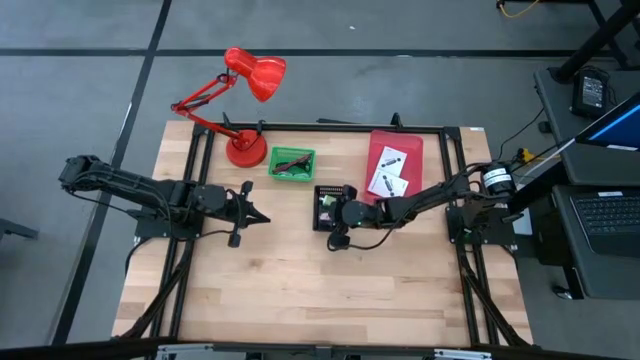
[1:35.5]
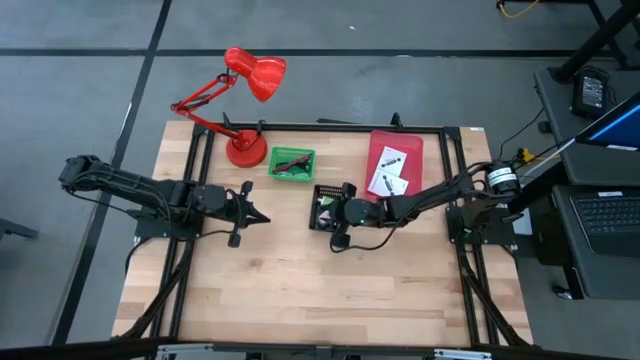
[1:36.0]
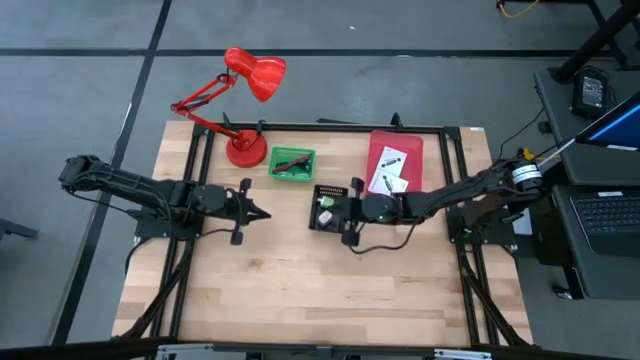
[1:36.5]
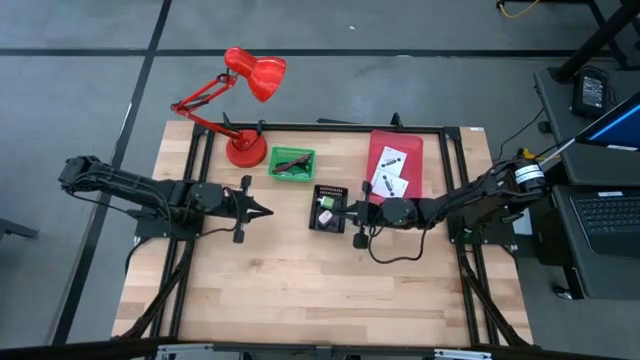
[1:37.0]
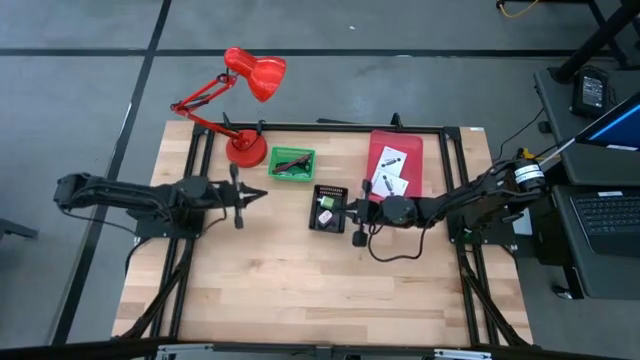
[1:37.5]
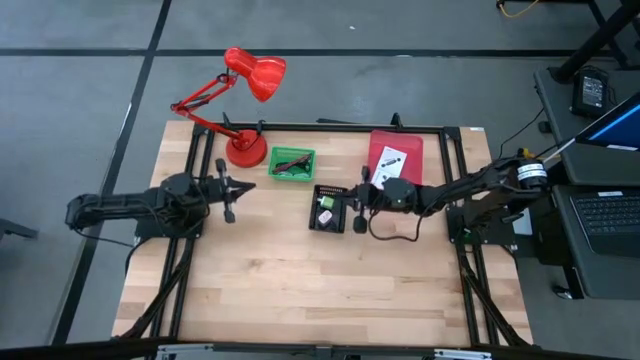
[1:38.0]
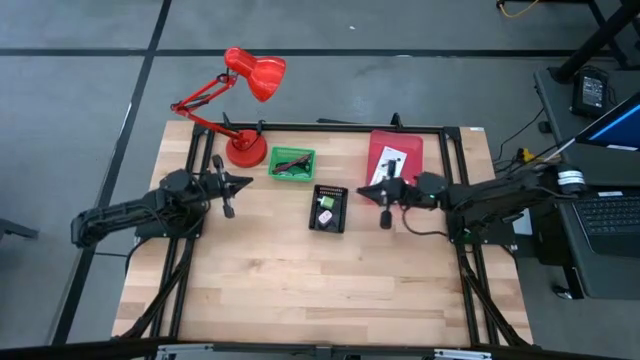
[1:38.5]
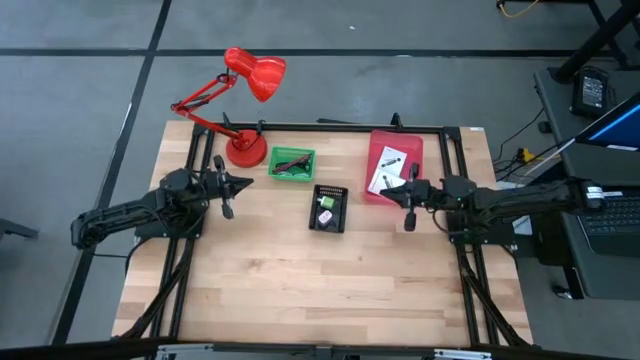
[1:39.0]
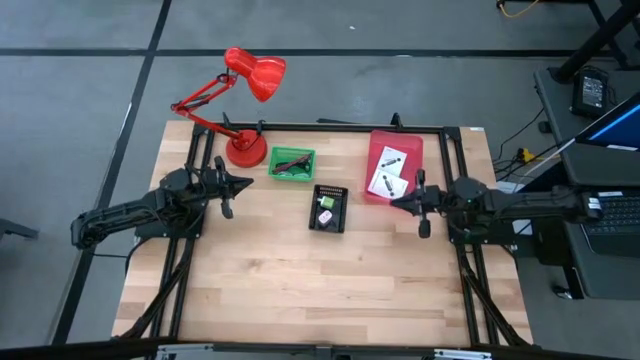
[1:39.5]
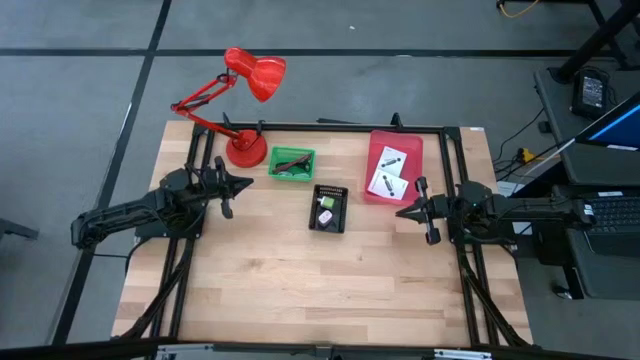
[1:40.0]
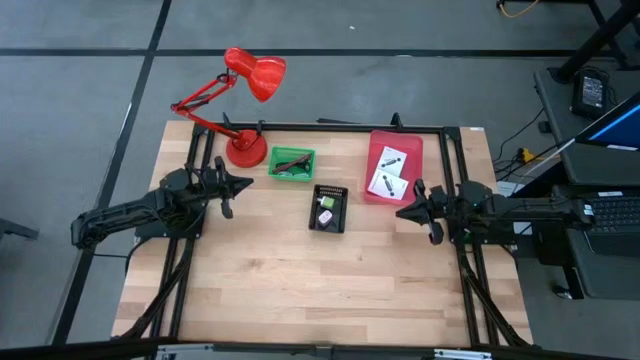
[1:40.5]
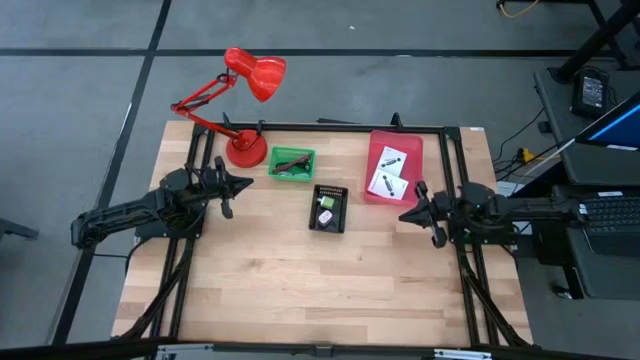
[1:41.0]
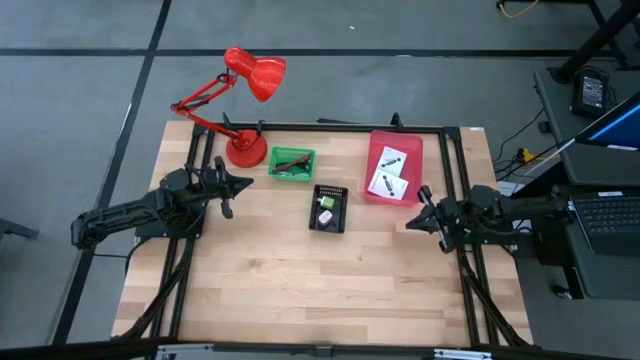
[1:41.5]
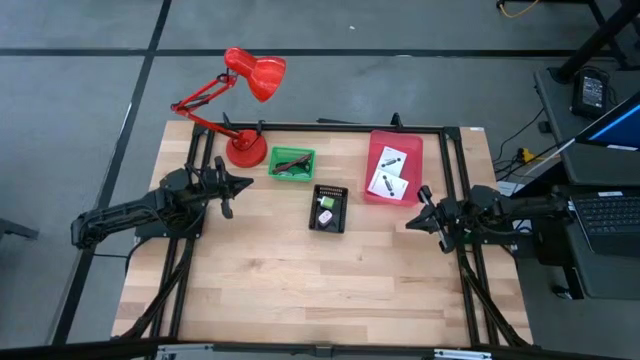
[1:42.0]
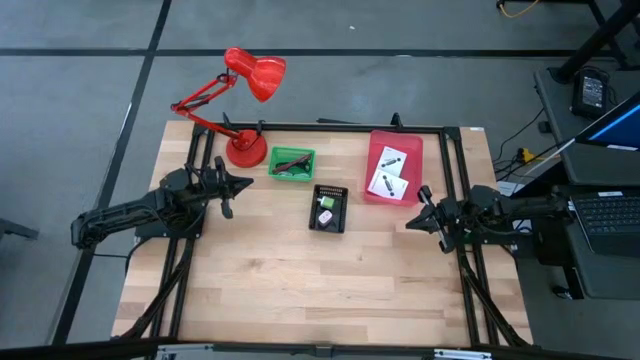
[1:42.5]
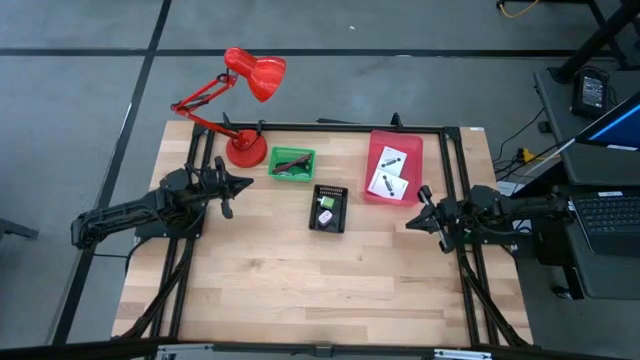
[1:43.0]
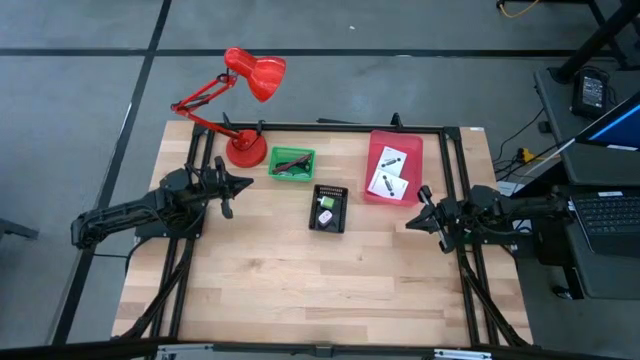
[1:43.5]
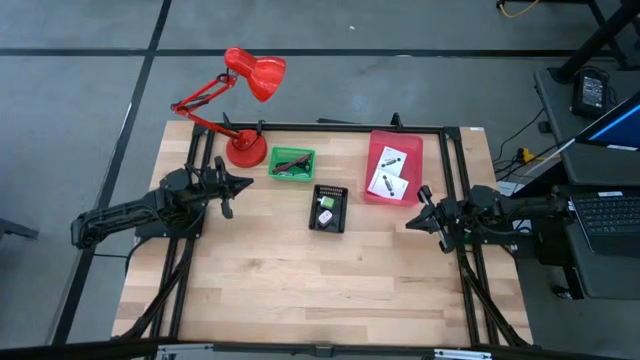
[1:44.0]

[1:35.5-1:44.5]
Task: Pick and place items into bin
Return to home position

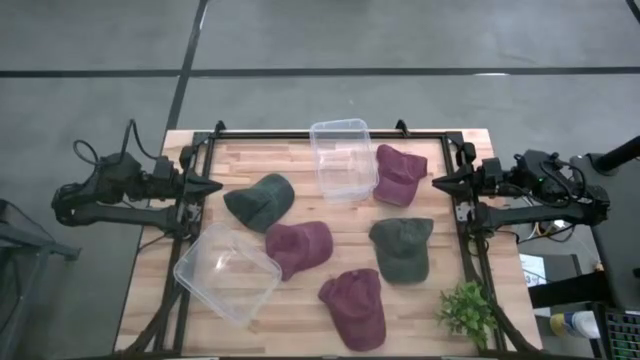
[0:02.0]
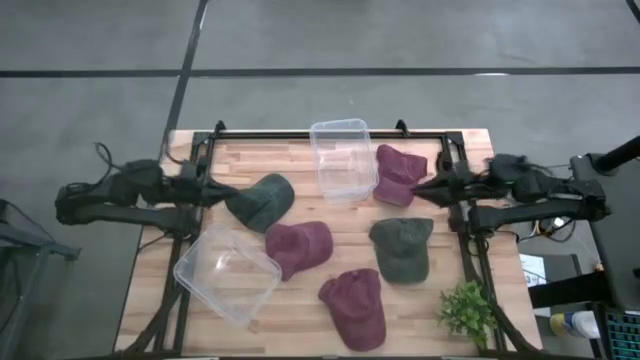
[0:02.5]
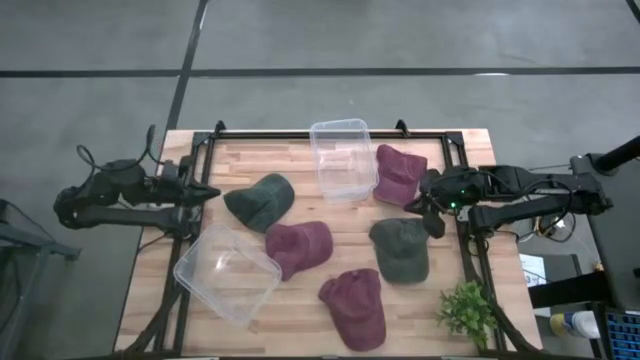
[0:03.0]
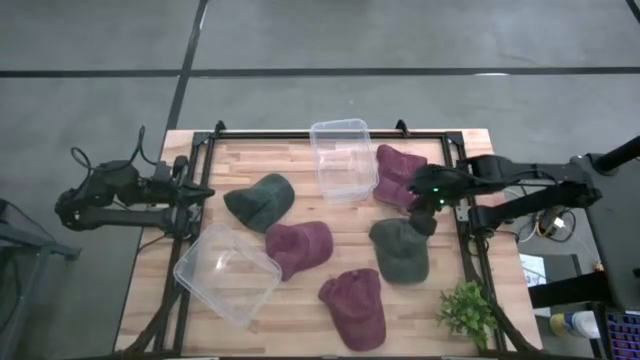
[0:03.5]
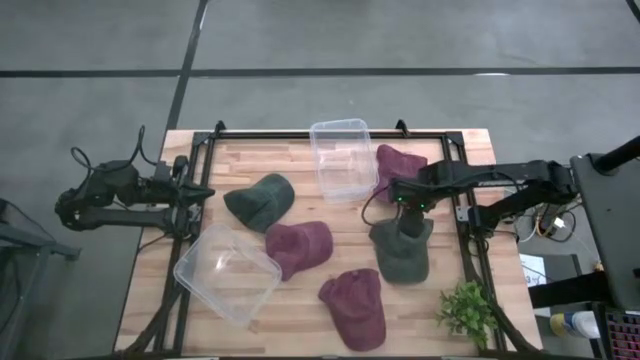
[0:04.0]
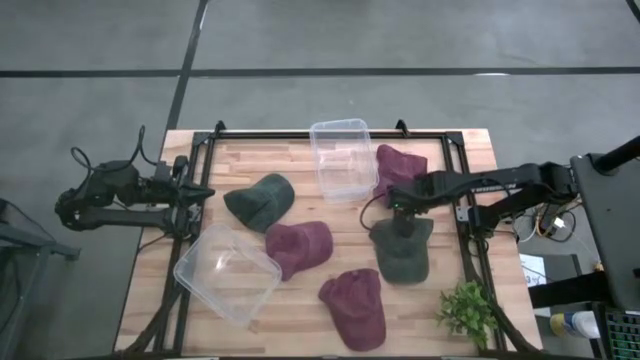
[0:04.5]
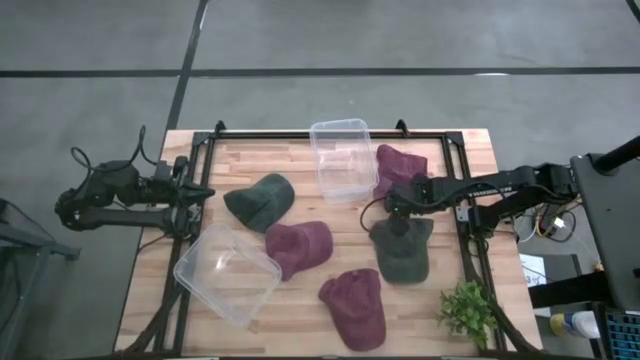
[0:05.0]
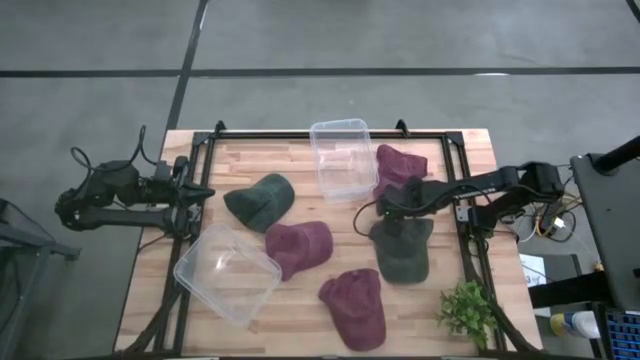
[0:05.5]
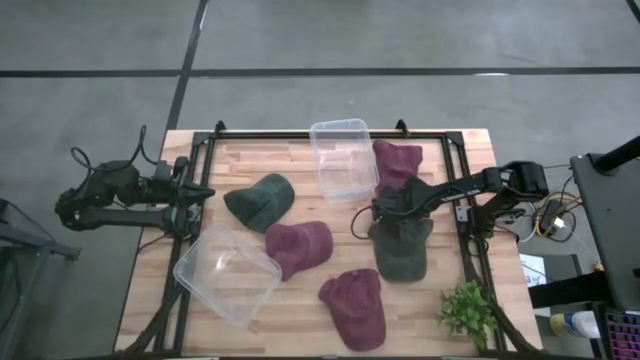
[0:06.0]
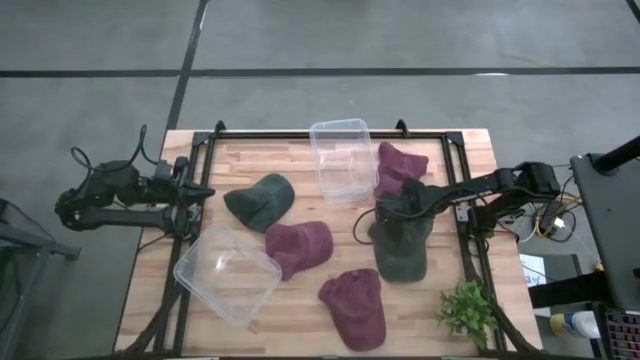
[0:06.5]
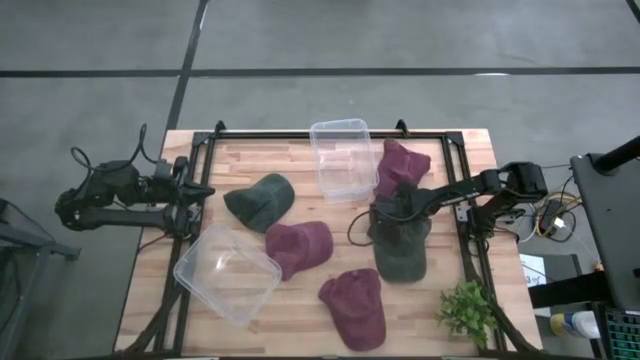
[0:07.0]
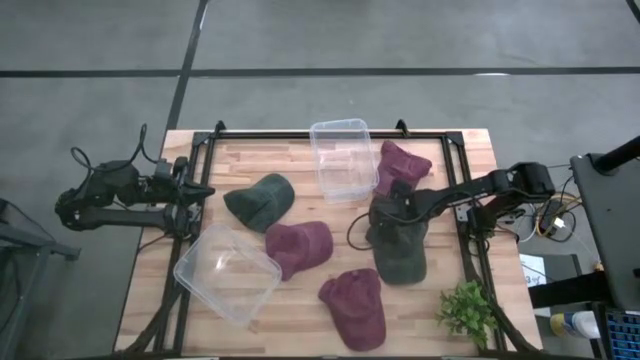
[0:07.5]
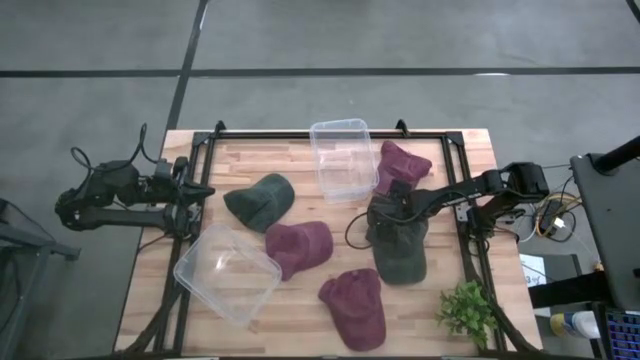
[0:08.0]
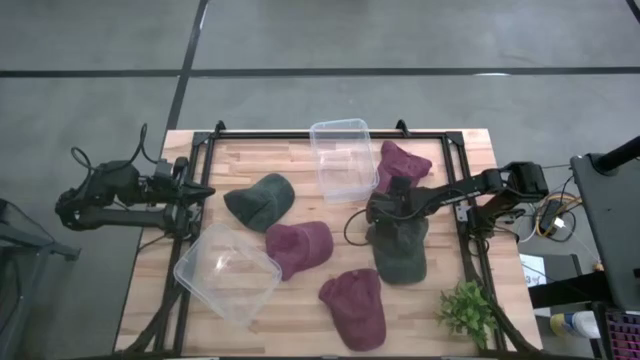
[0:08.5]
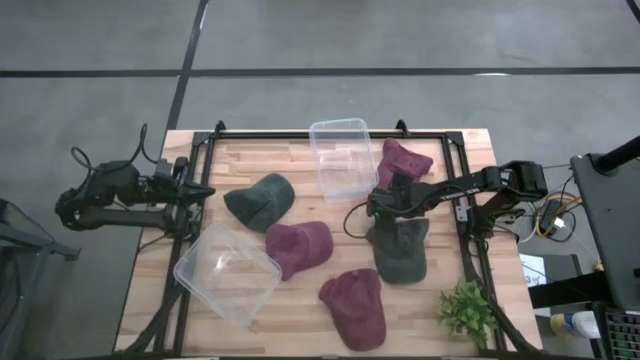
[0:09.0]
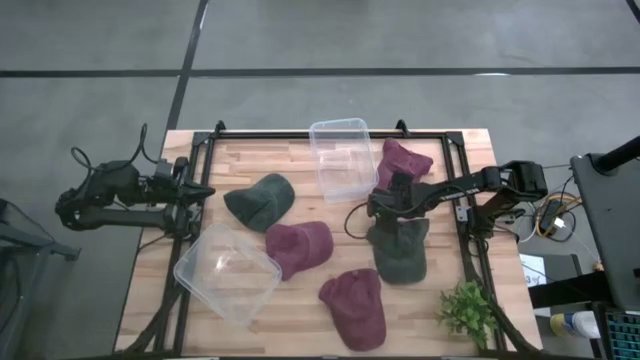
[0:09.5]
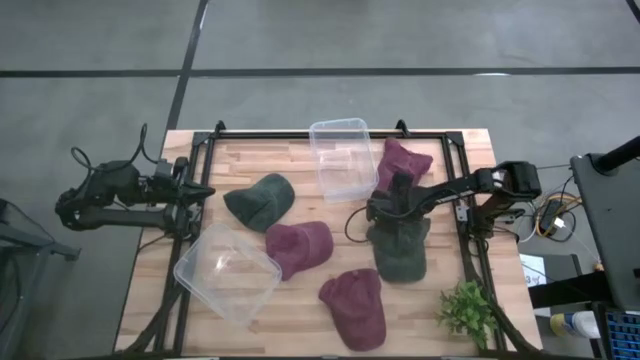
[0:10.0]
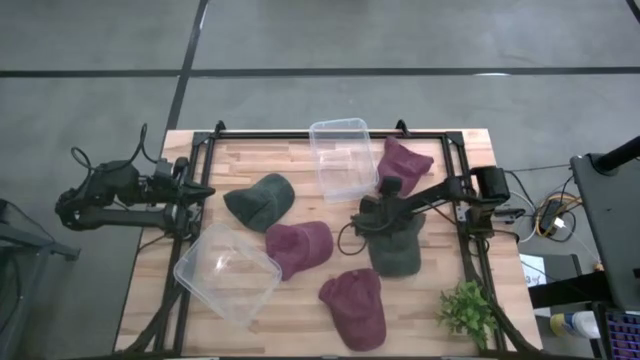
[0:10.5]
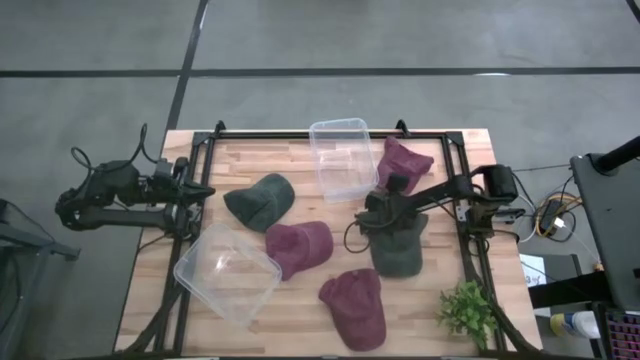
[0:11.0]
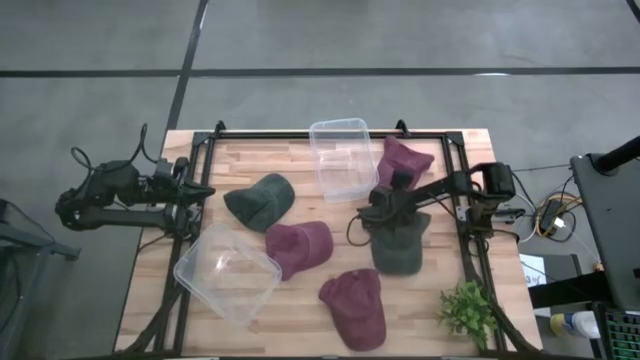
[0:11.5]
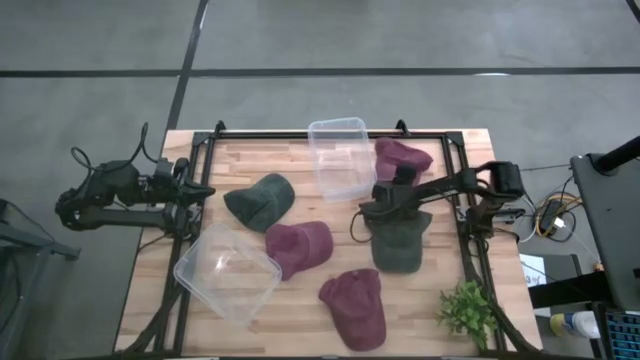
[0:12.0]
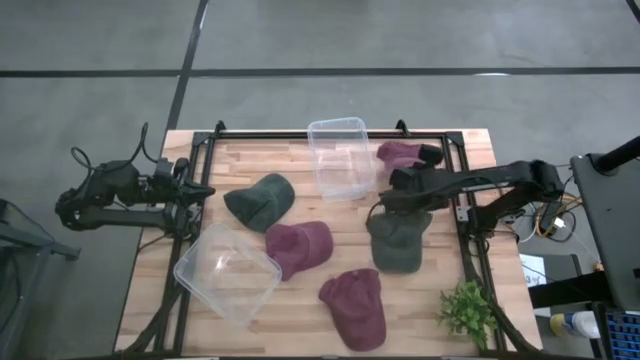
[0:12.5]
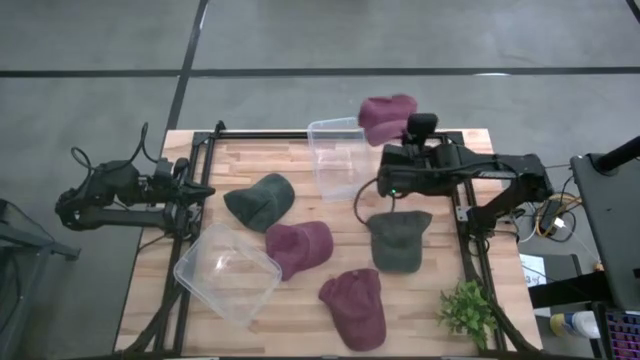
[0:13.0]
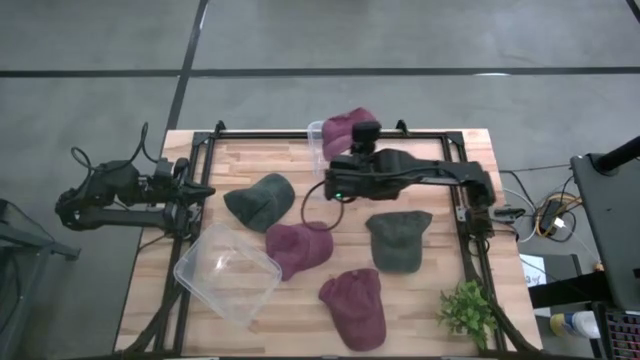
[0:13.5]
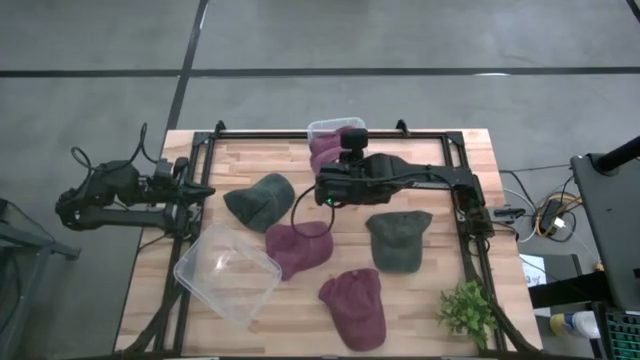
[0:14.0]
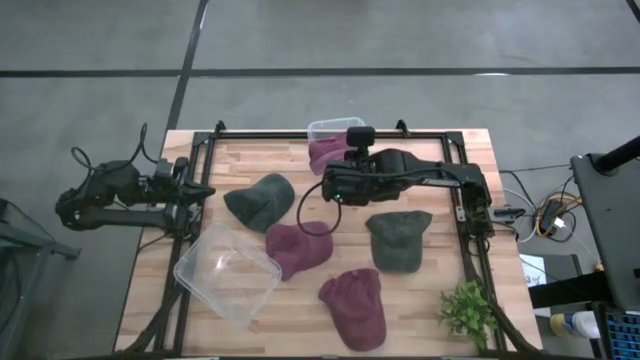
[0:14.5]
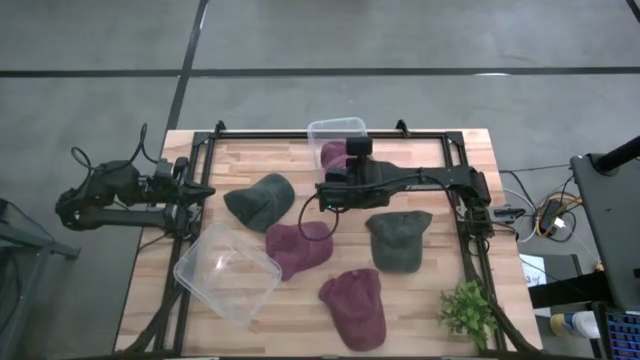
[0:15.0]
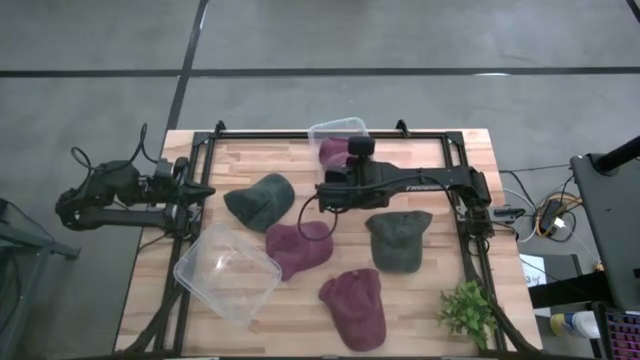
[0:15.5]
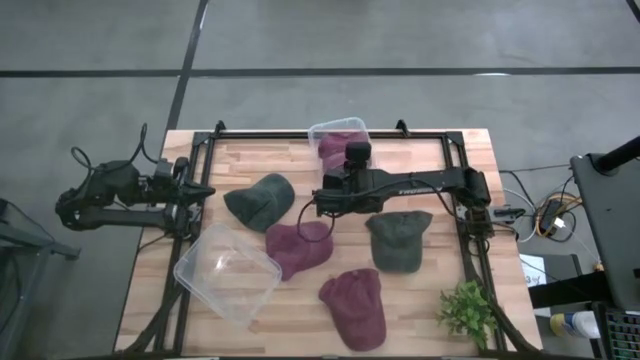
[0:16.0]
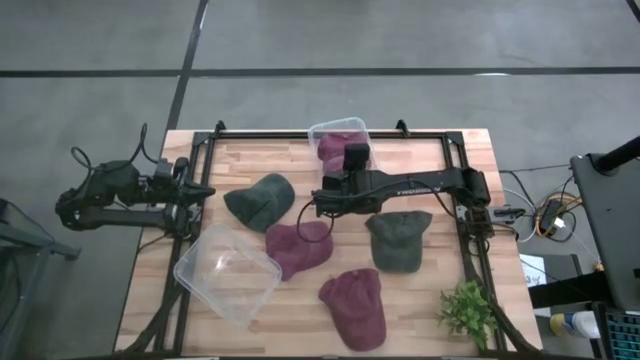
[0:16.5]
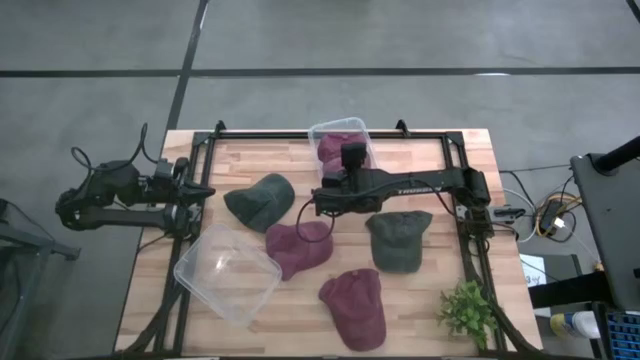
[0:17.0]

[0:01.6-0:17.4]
Task: Pick & Place hat
Put the dark red cap into the top transparent bin
